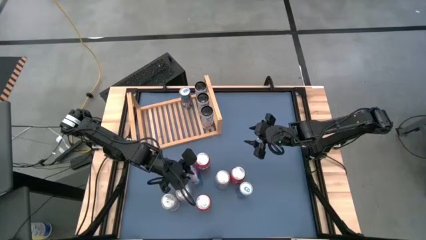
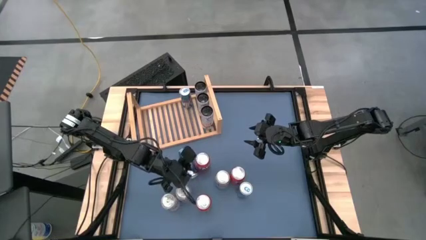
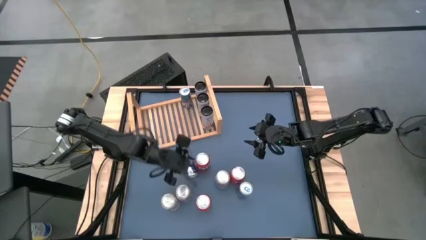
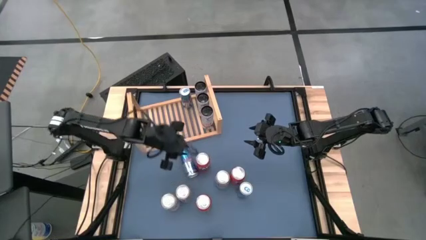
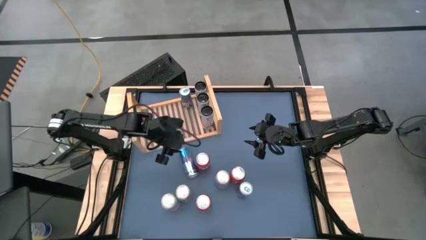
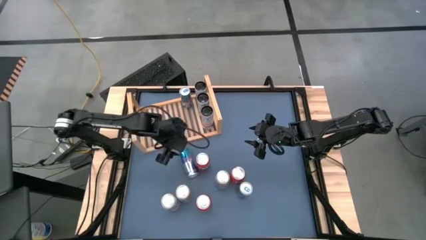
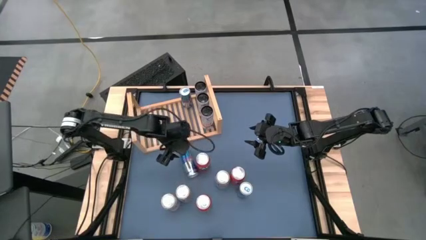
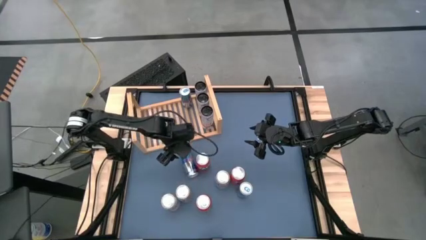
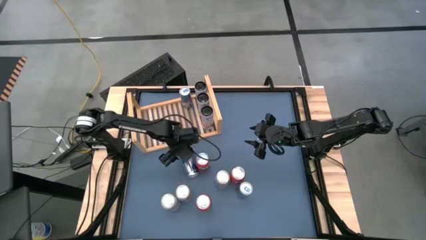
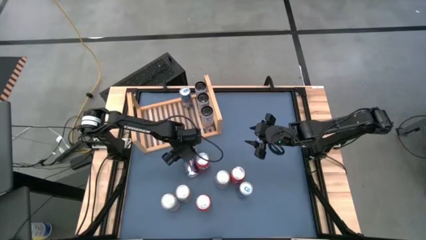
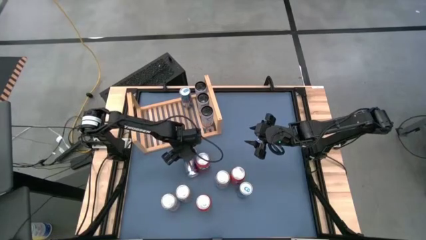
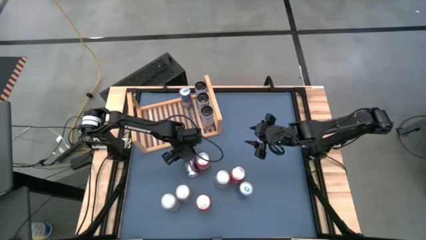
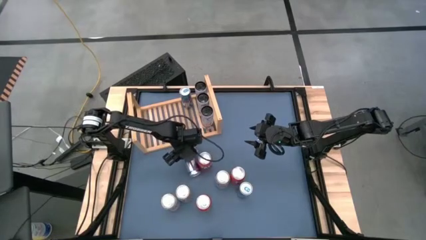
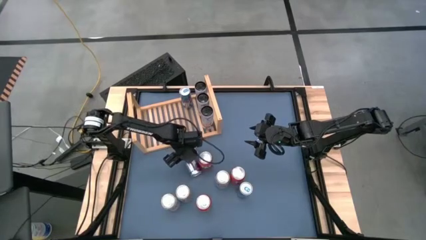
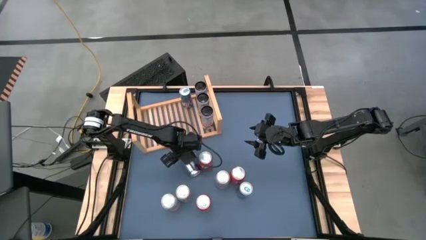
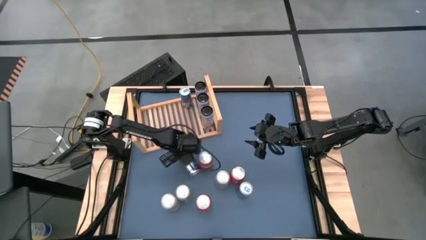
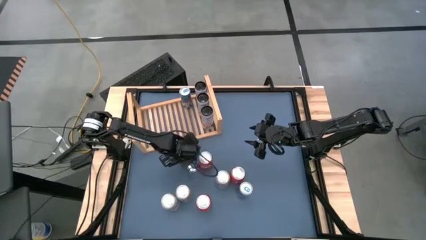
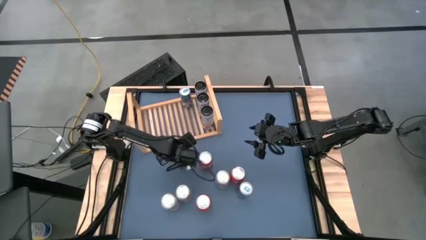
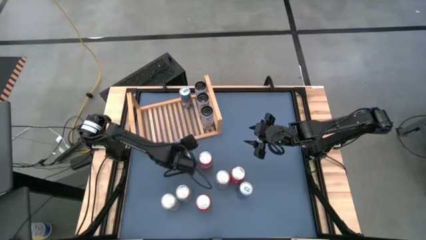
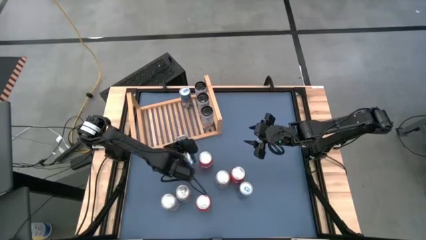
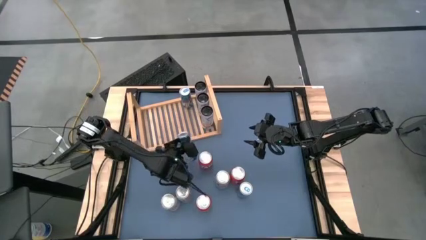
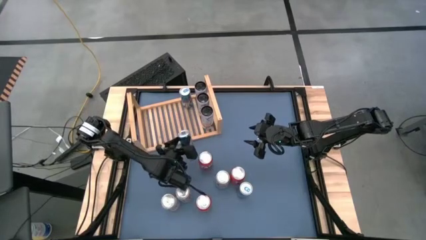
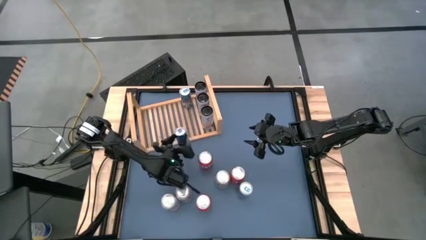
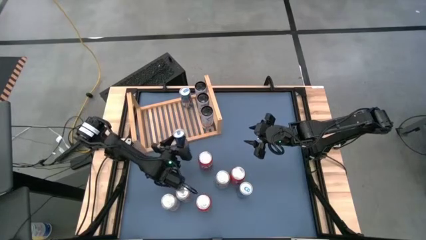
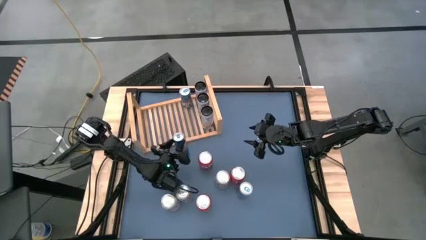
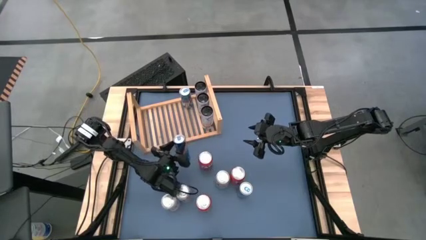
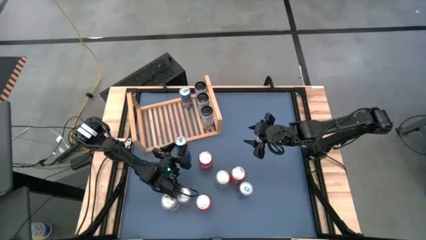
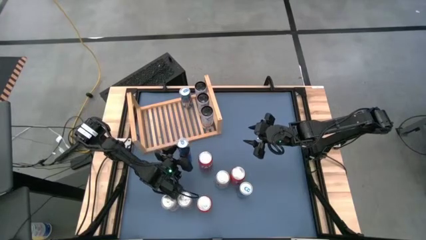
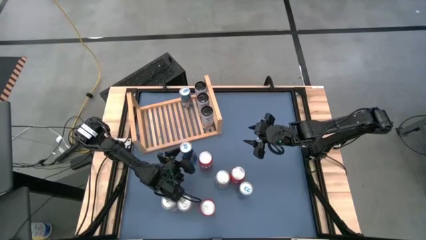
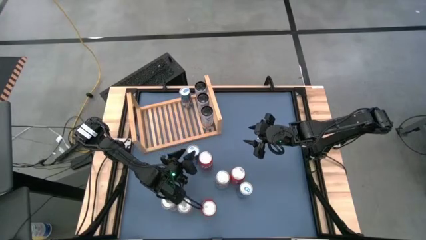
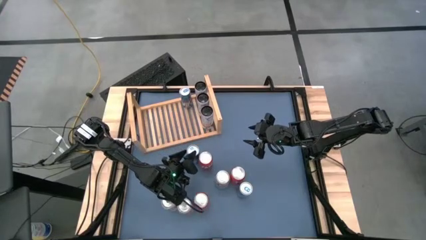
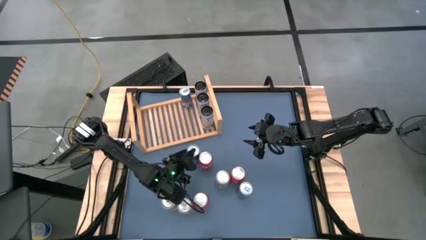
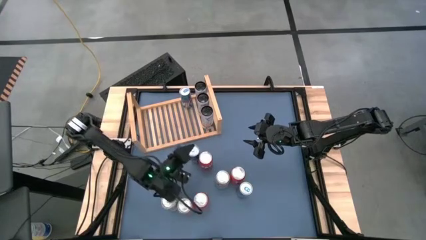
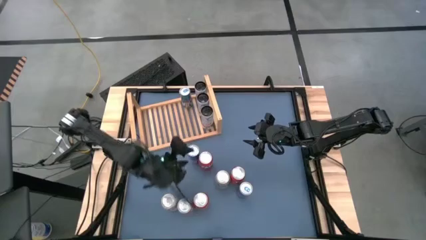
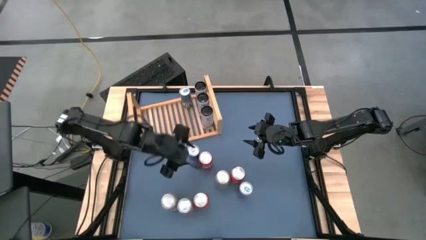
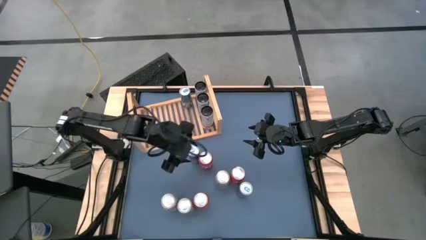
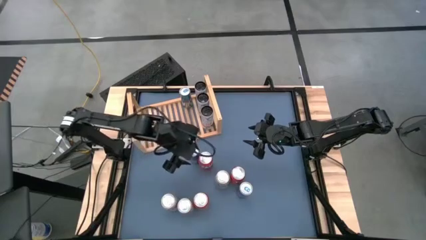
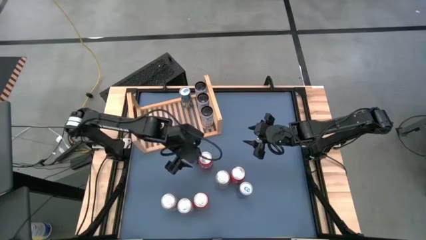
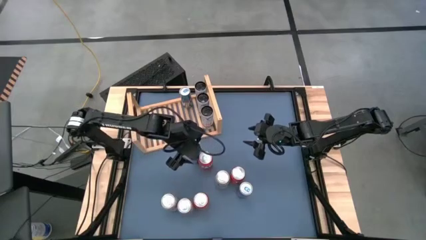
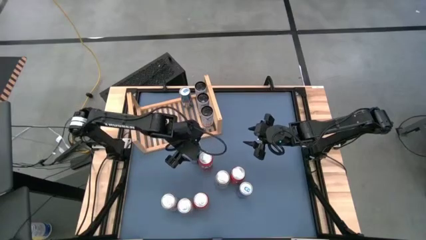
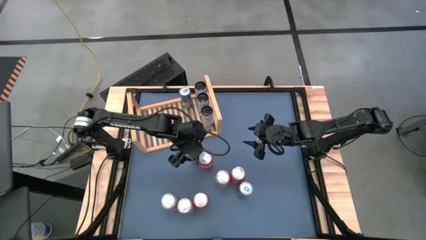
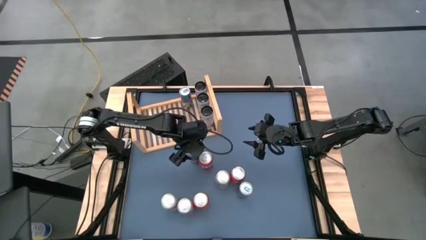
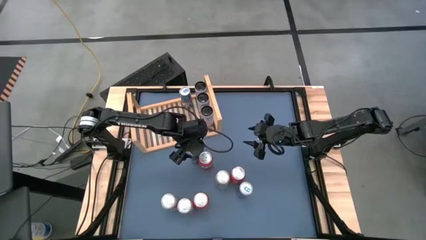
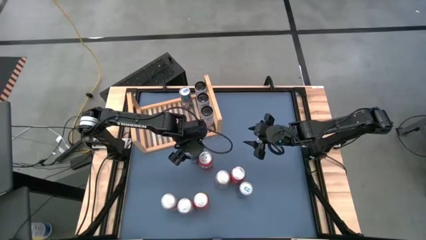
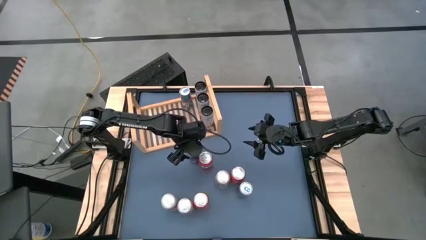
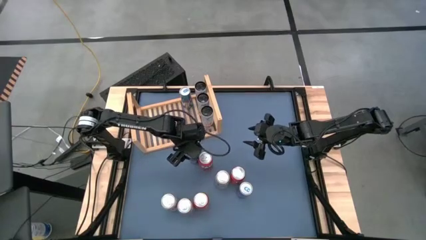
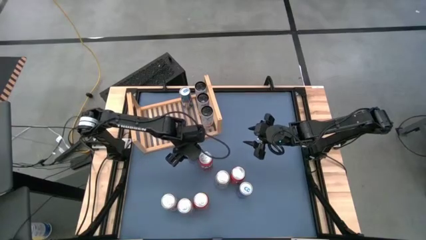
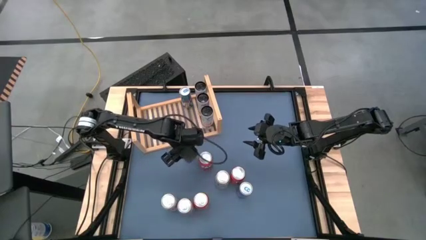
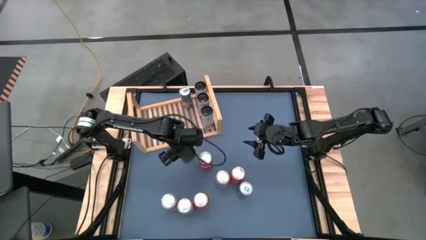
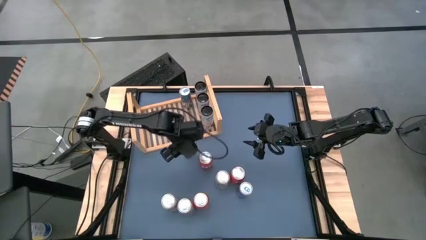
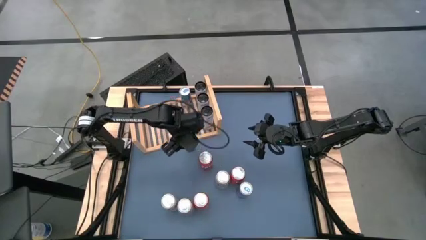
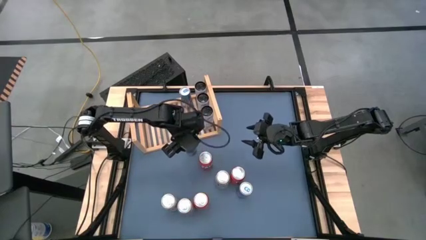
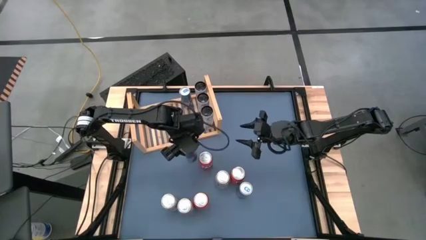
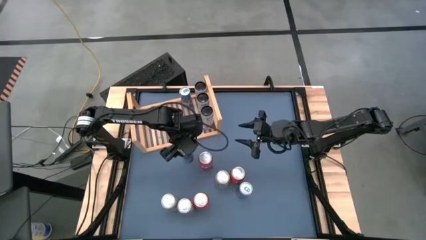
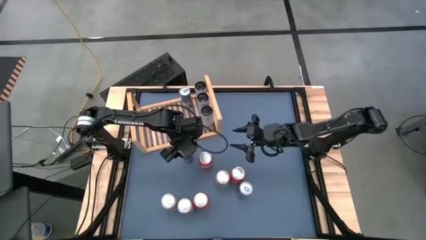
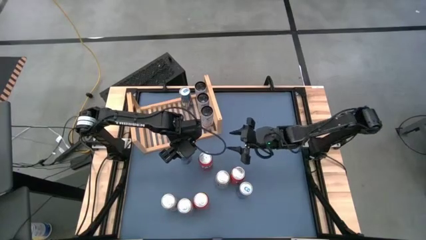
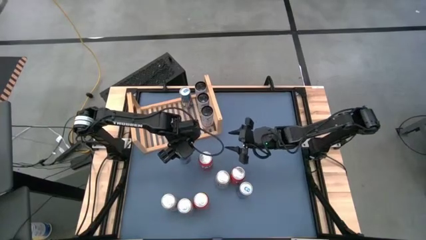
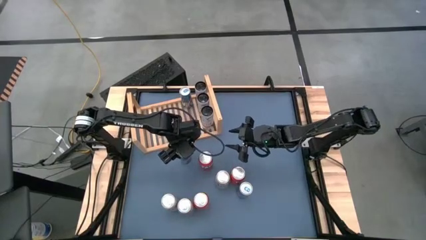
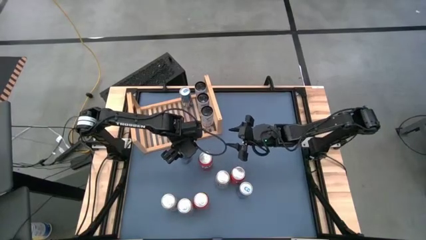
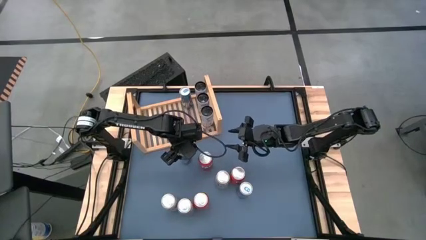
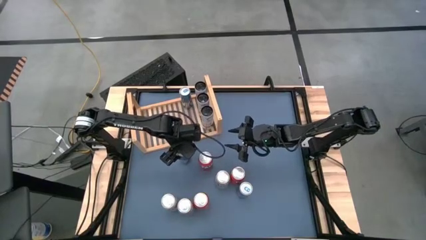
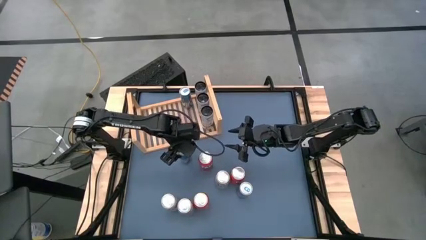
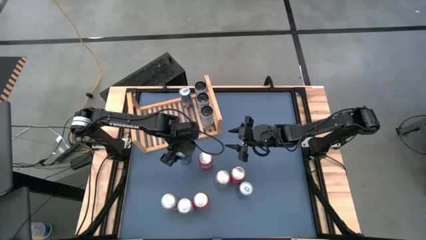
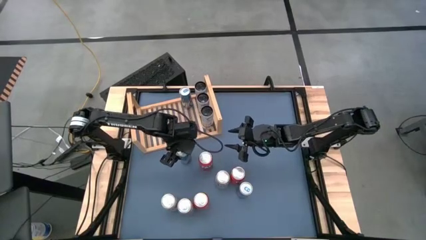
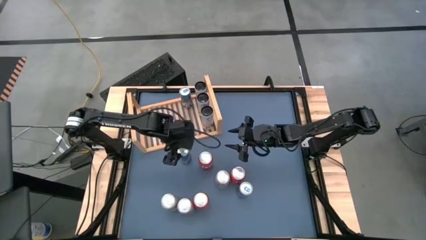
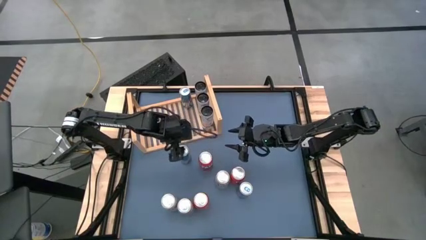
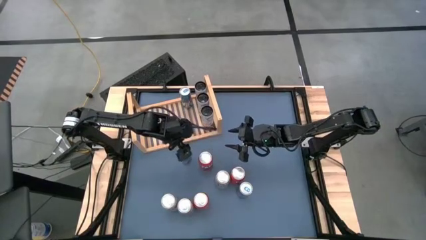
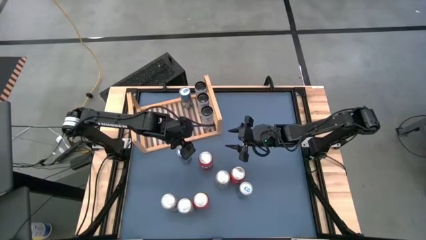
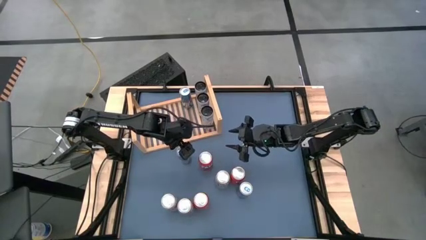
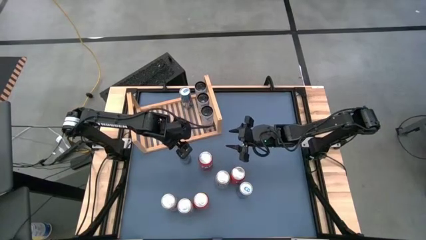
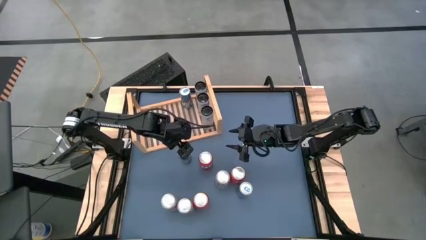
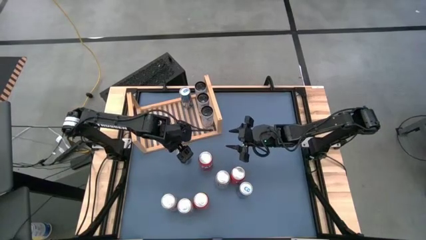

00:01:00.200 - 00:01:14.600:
Task: Place canned beverage on shelf
Put the left blue soda can on the shelf aligned with the other blue soda can

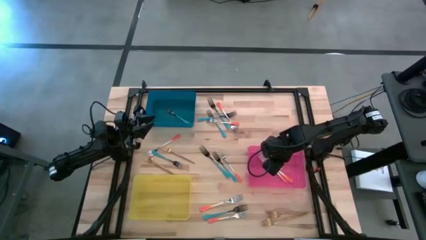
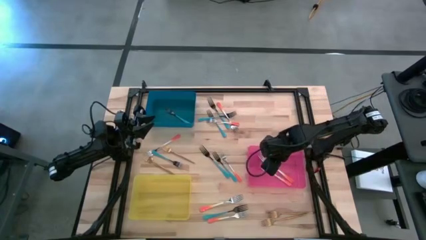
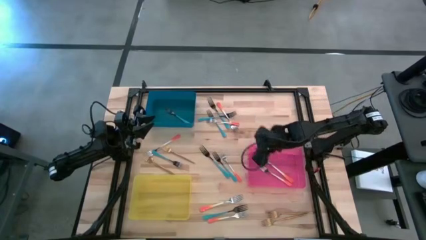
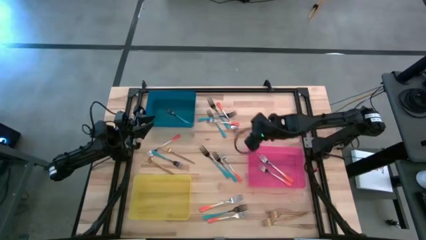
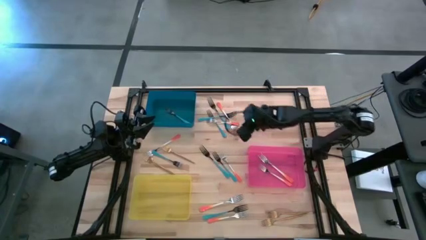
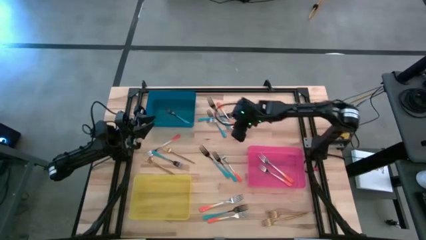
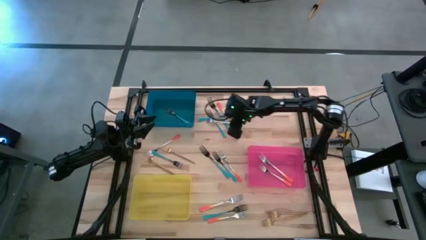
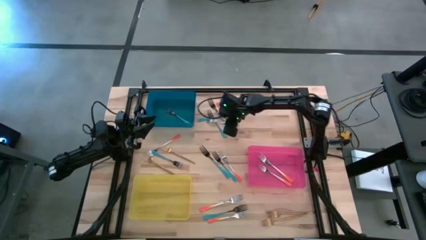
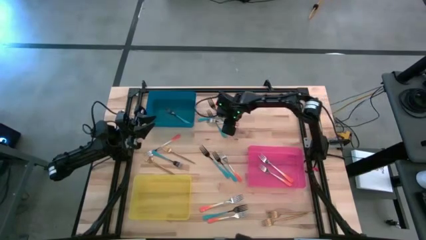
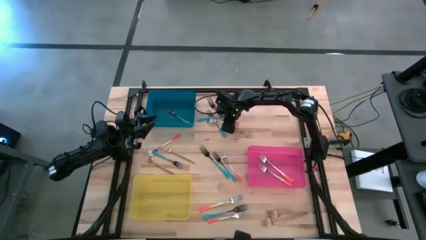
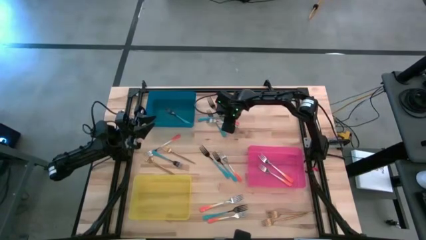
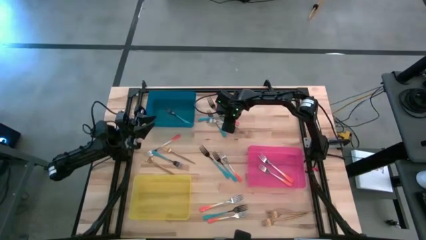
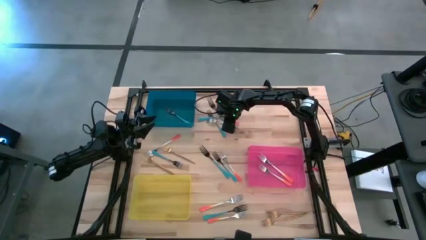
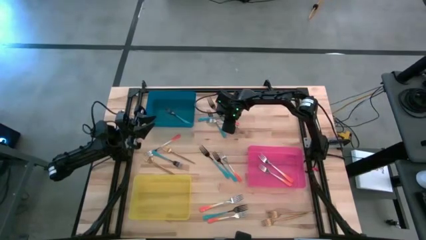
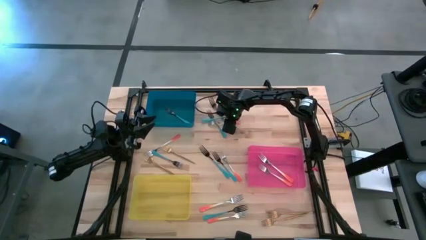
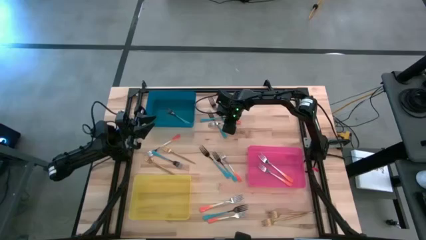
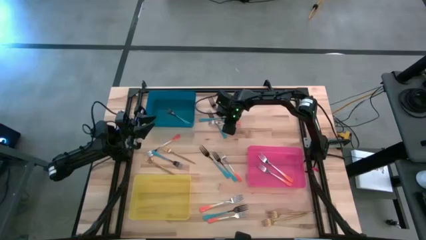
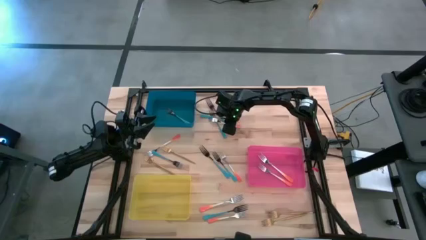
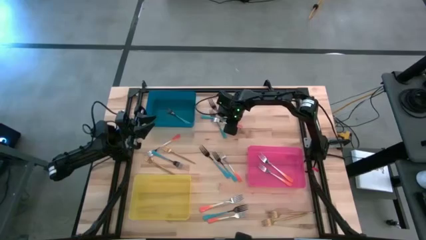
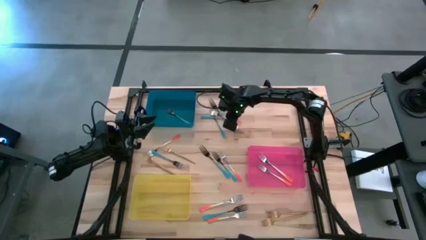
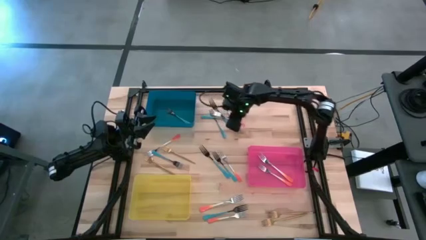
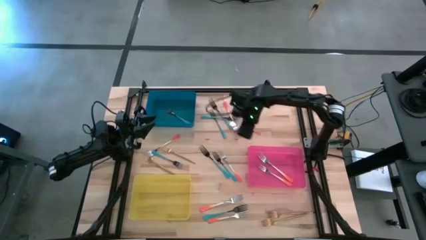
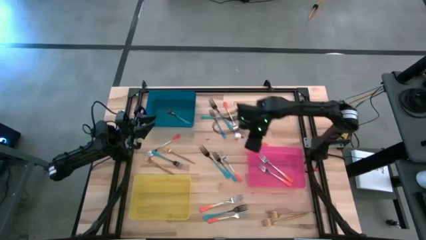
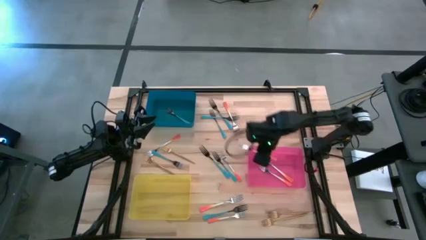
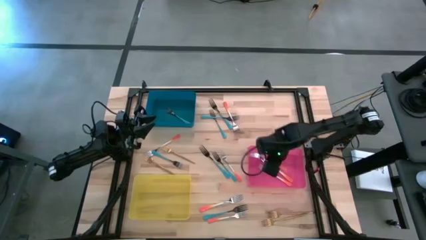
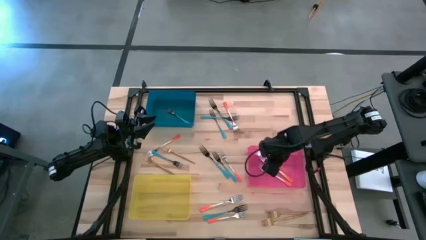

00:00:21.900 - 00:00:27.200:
Task: Sort silverware by color (type)
Put the orange fork into the red bin
